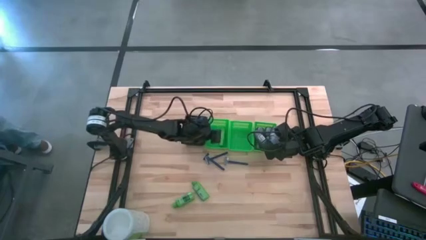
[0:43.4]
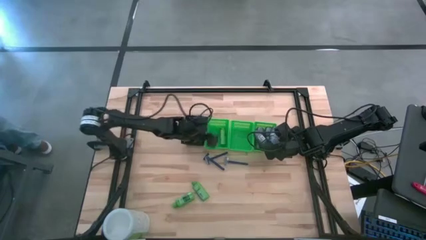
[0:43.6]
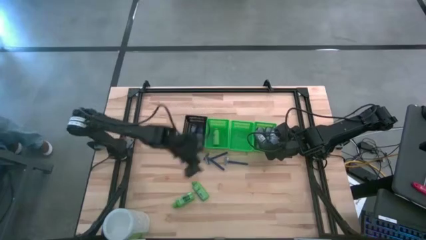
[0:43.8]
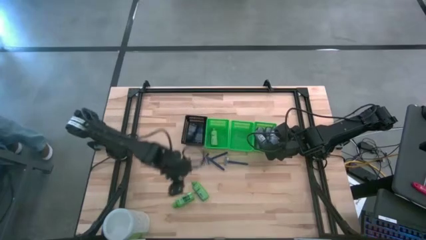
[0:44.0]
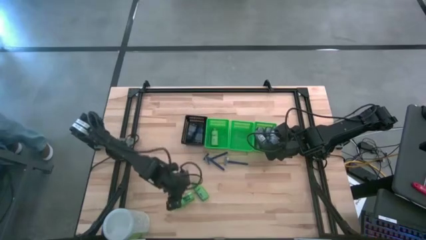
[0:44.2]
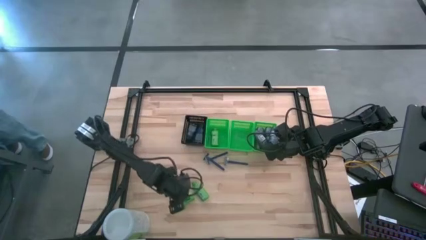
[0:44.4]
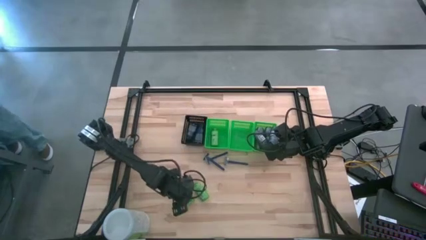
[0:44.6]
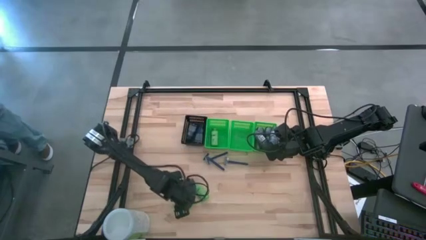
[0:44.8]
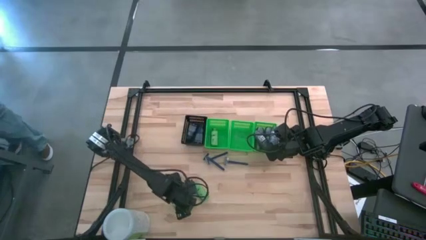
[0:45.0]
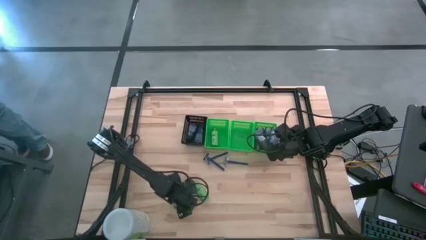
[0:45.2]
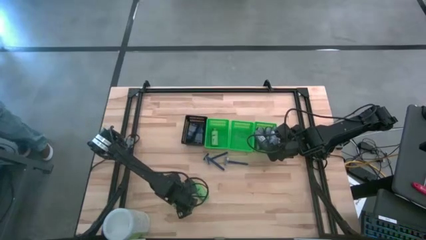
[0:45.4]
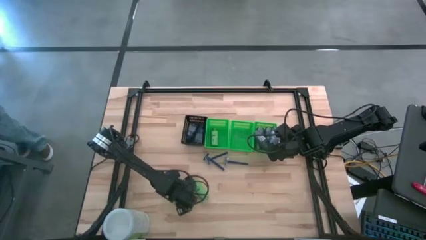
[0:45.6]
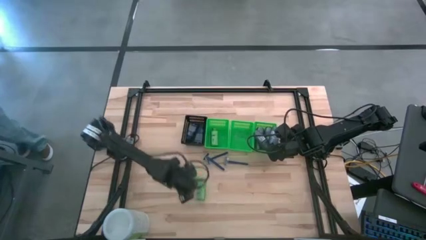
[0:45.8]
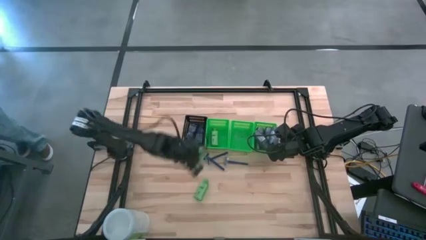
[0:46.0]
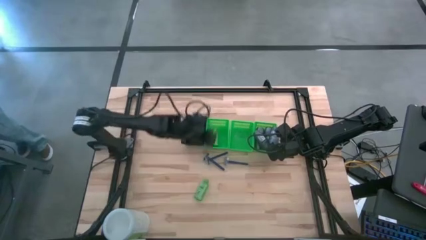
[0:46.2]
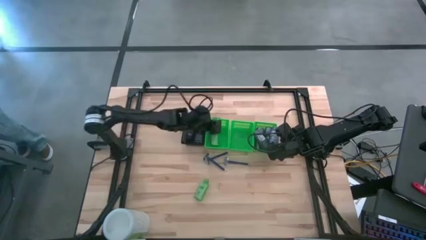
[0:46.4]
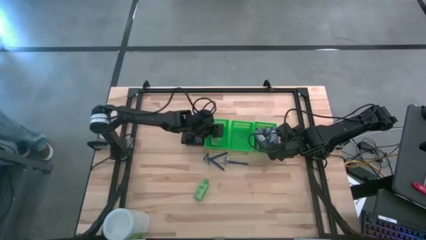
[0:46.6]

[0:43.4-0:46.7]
Task: Pick & Place Travel size toiletries
Put the green shampoo into the left green basket

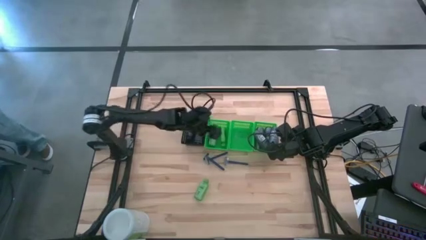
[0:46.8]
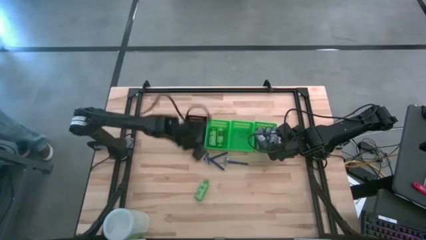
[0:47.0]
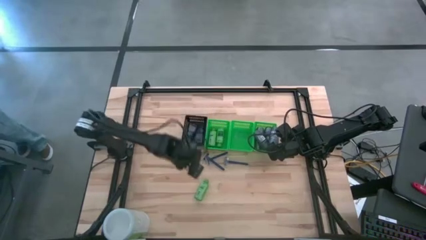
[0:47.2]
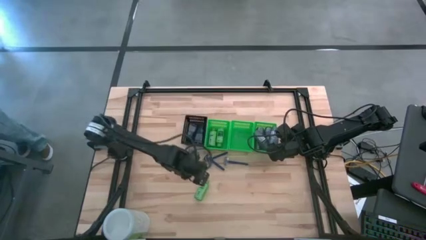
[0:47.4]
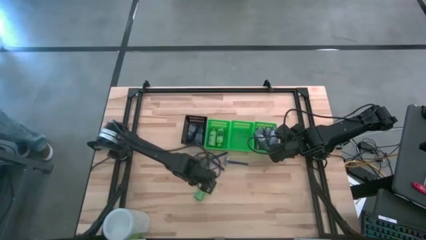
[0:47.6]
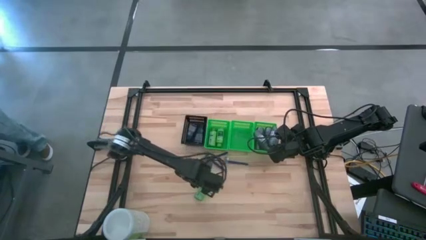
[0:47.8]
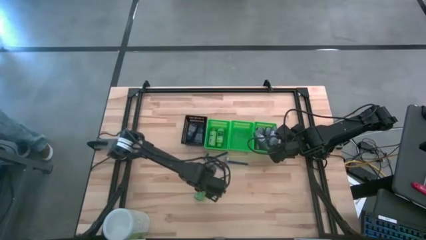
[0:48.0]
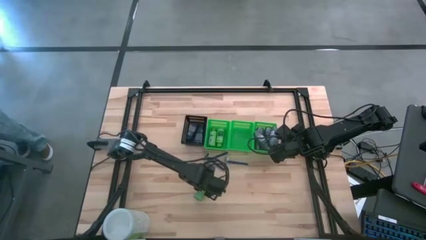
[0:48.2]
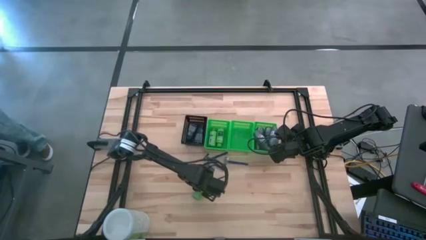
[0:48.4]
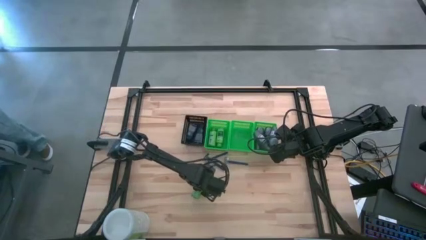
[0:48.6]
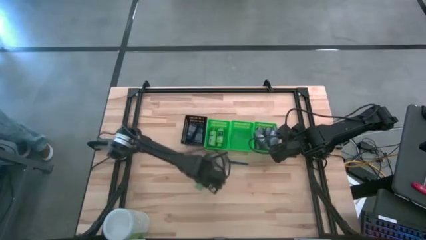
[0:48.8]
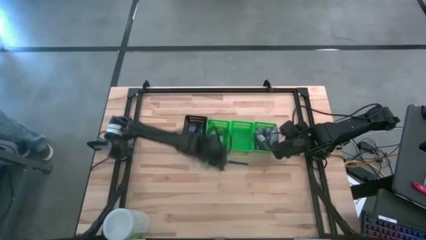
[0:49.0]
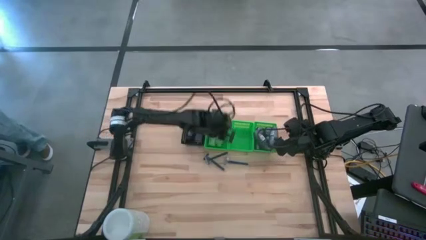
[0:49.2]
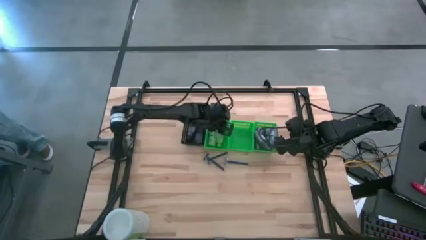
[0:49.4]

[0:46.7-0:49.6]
Put the green shampoo into the left green basket

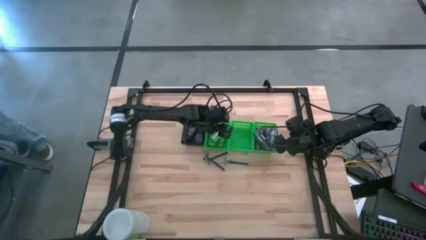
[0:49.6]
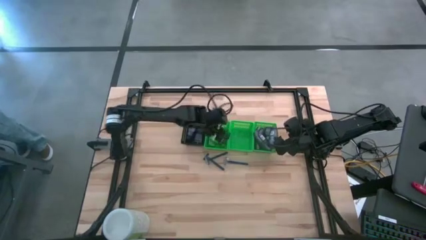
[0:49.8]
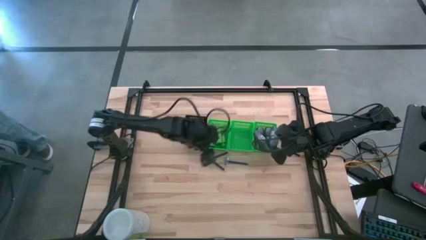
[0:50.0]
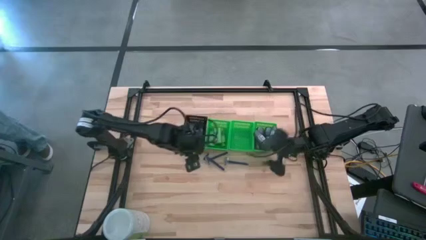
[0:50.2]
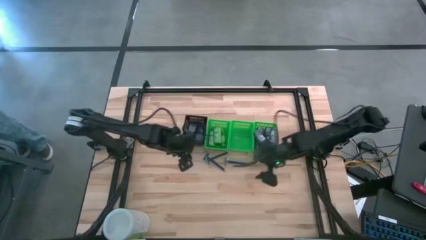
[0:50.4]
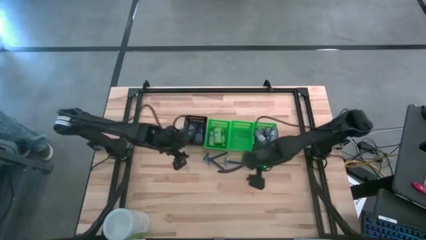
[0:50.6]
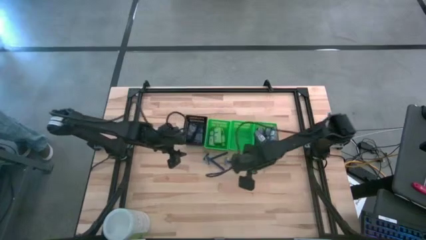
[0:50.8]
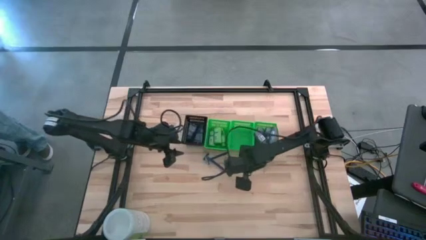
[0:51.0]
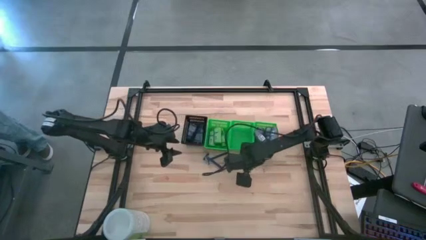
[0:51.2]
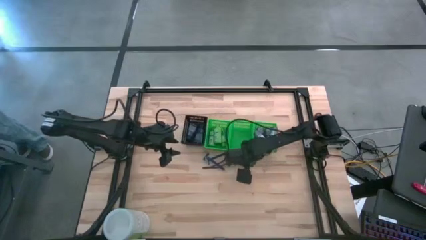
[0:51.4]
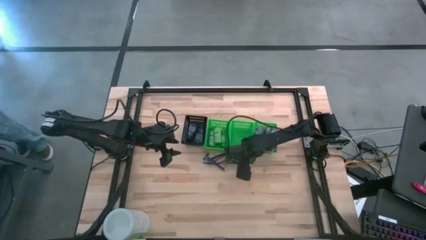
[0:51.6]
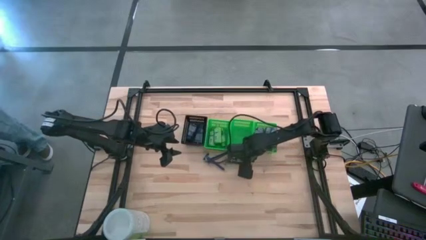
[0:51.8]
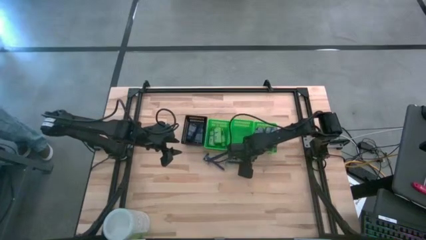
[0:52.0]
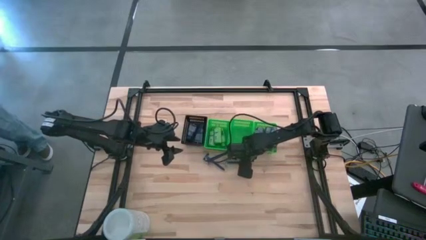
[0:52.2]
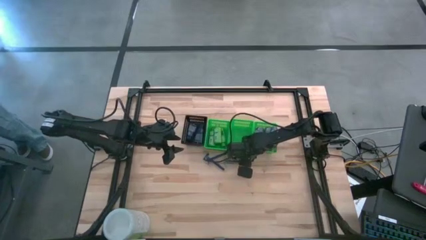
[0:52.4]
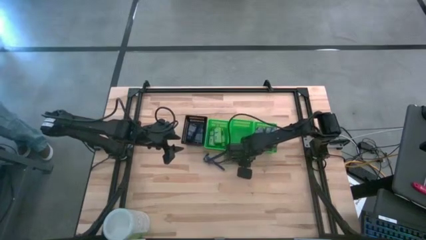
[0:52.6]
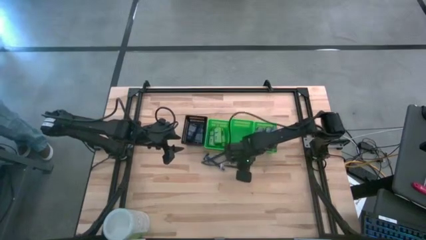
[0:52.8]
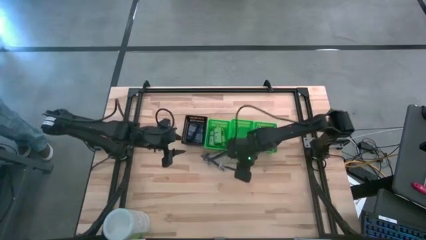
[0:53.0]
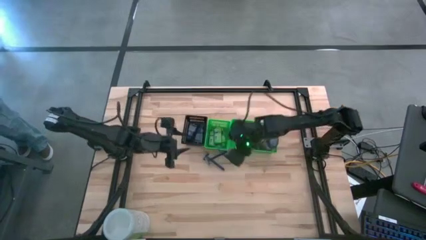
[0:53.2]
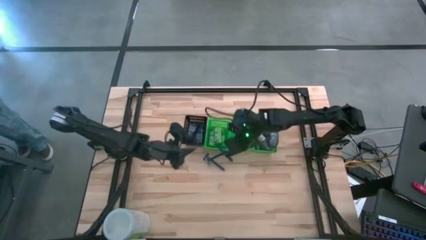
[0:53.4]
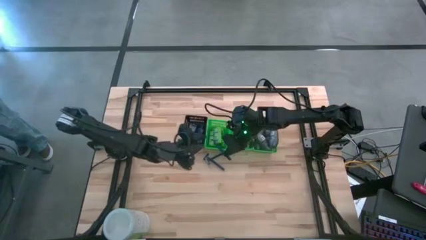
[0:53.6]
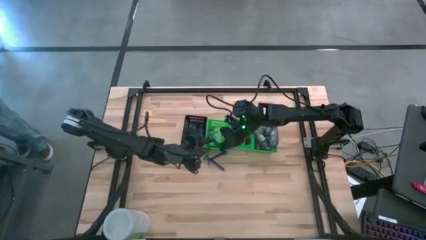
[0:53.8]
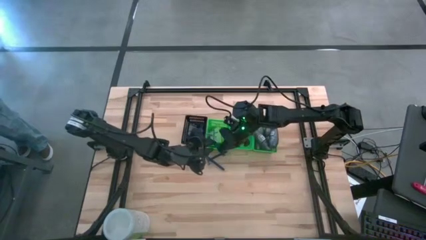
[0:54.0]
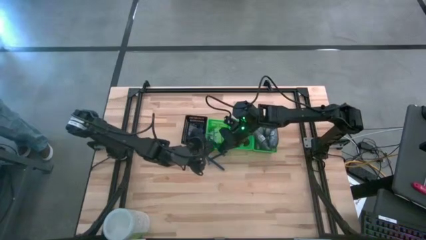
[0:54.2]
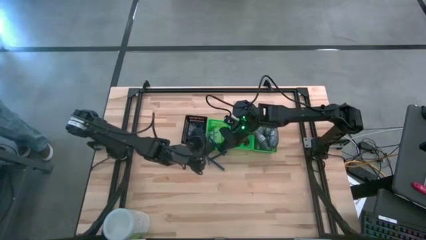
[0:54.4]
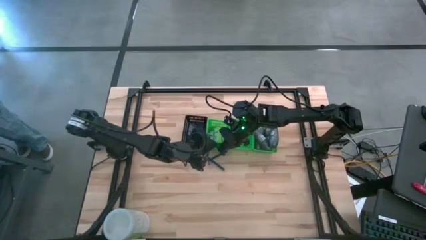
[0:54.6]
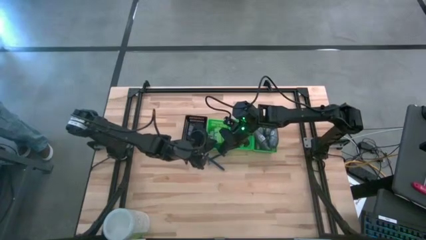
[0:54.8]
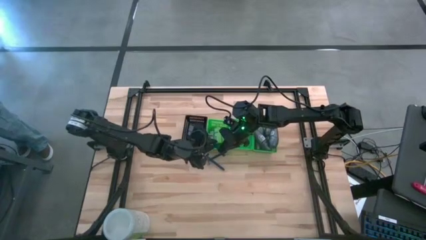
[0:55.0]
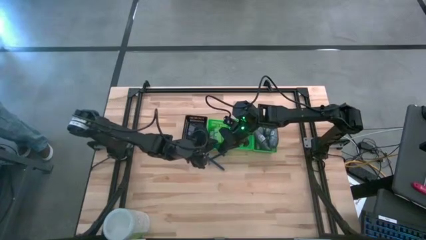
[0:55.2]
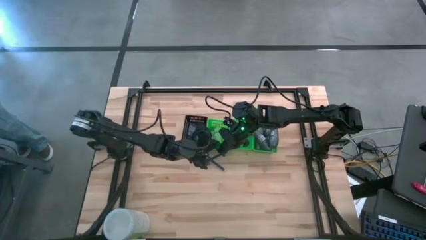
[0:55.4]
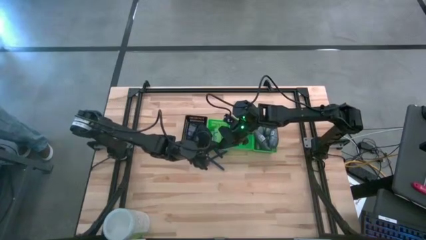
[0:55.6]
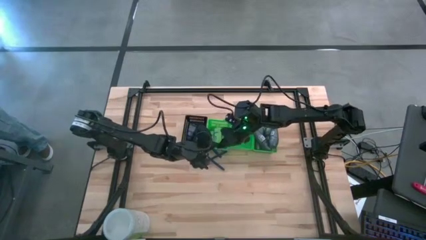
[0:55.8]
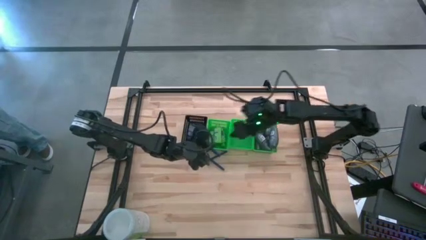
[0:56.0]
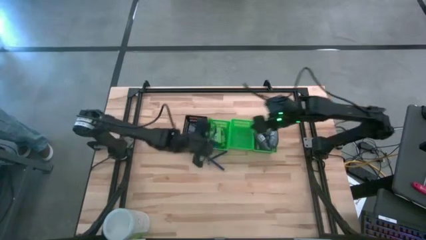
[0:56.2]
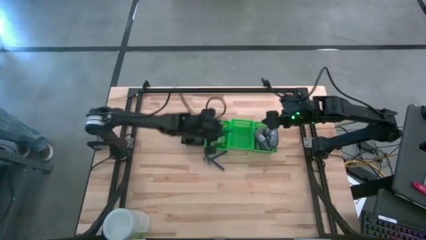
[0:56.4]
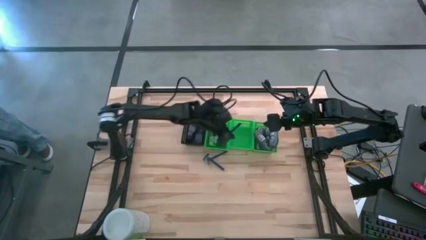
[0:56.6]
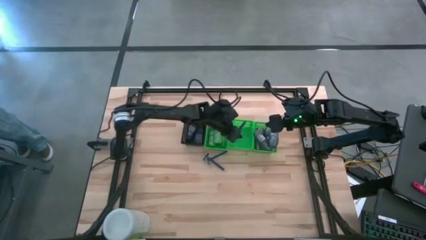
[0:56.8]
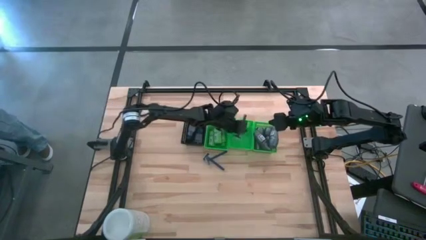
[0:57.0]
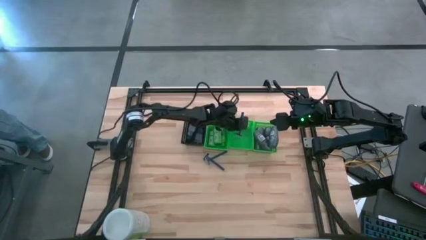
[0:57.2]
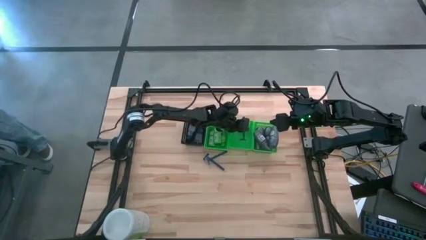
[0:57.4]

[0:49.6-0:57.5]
Put the blue razor into the middle green basket

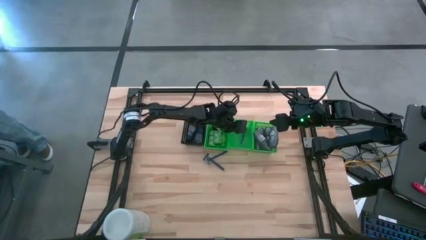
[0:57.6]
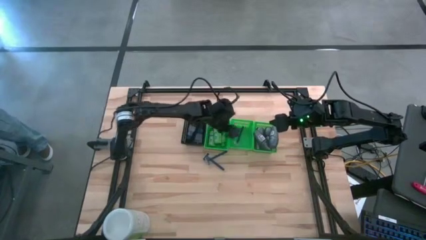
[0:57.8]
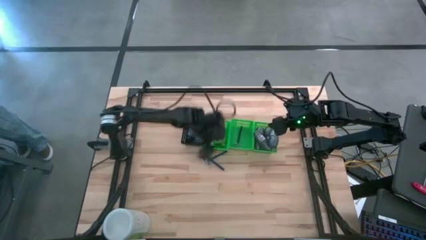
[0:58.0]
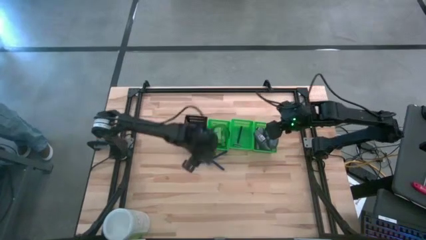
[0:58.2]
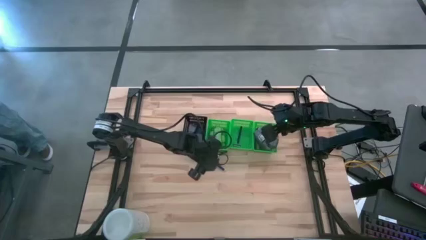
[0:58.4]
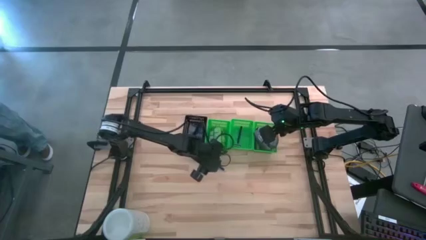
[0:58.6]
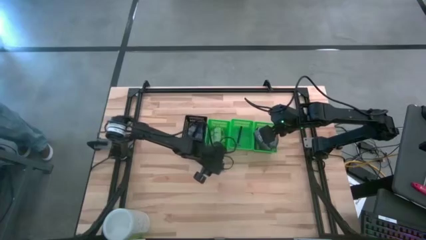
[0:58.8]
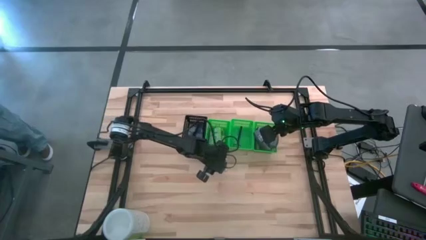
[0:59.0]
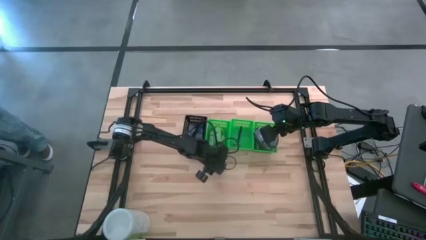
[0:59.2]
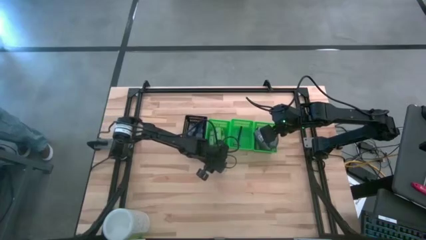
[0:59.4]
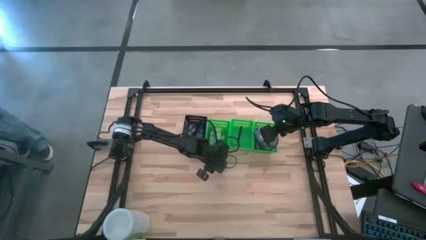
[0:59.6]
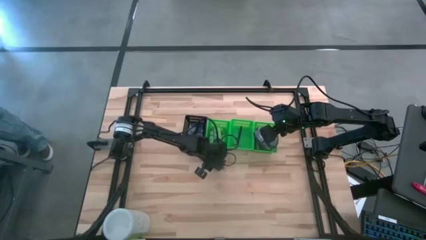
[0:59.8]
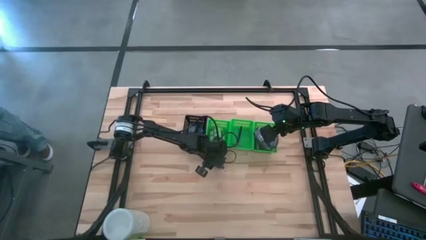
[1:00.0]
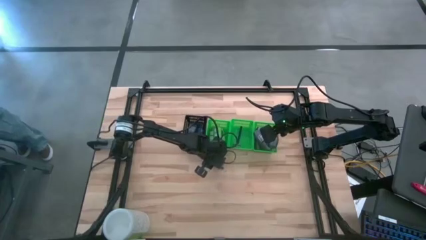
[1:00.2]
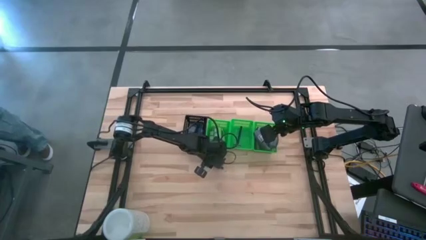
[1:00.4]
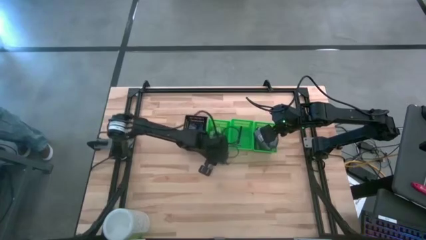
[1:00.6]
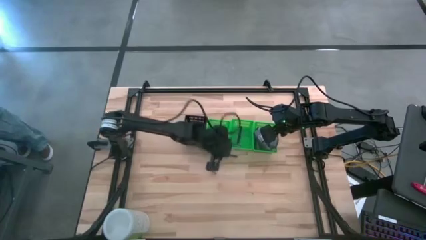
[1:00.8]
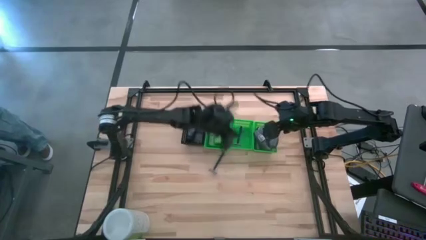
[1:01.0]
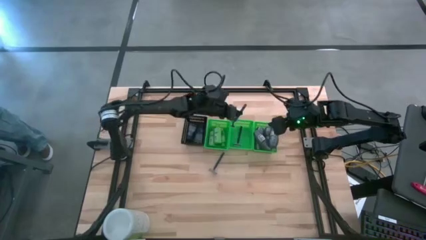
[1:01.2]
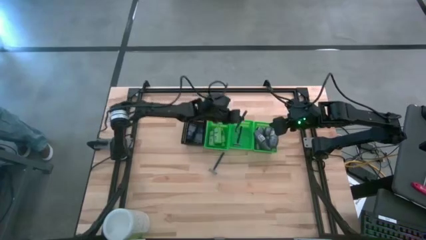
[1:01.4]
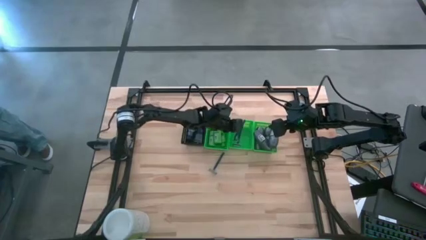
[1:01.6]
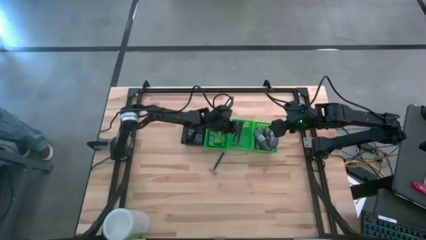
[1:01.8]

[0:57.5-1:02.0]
Put the blue razor into the middle green basket
